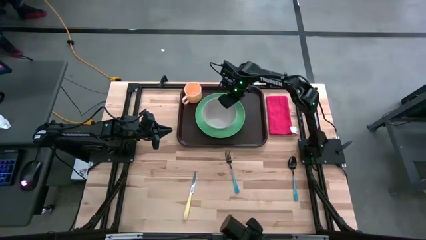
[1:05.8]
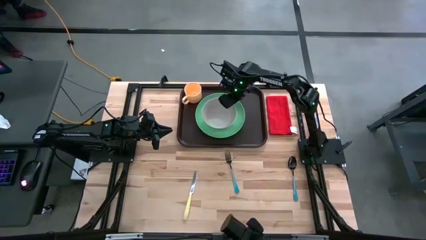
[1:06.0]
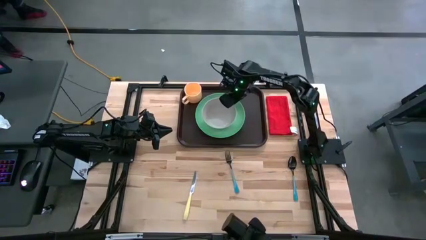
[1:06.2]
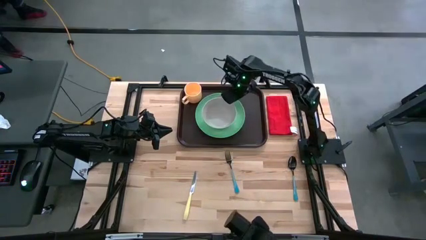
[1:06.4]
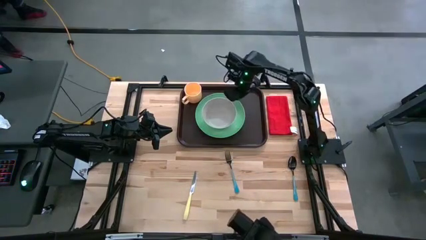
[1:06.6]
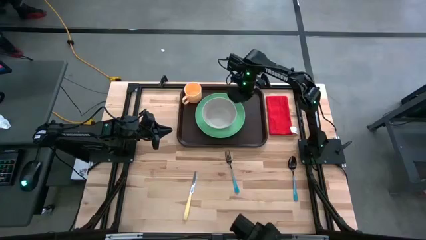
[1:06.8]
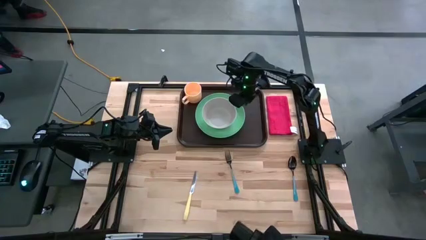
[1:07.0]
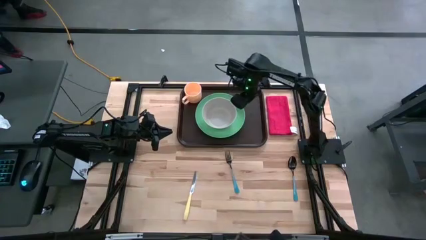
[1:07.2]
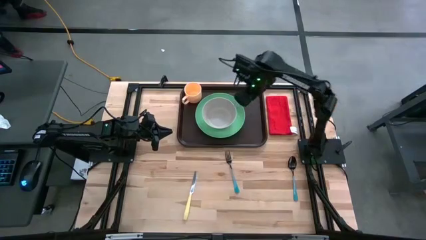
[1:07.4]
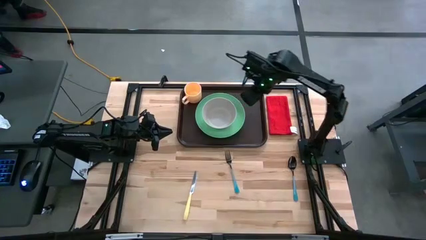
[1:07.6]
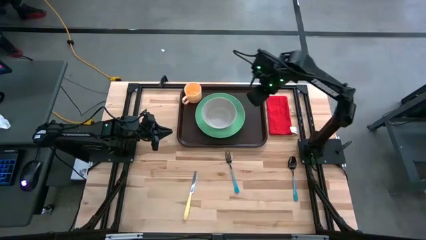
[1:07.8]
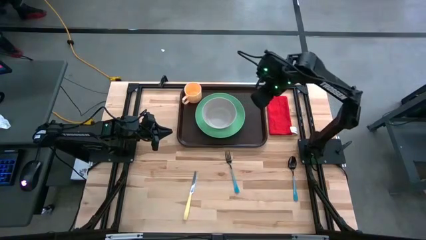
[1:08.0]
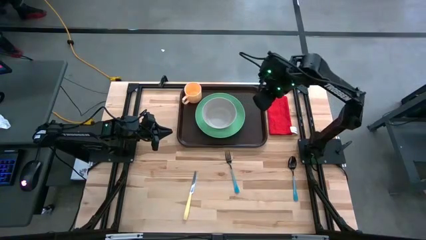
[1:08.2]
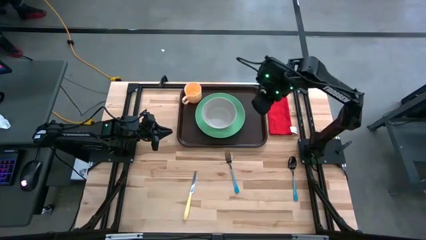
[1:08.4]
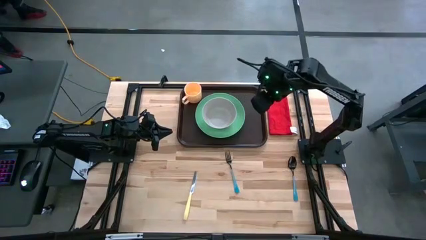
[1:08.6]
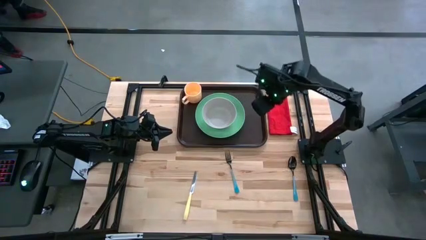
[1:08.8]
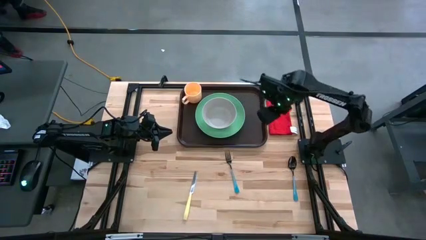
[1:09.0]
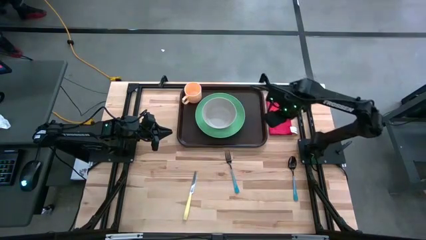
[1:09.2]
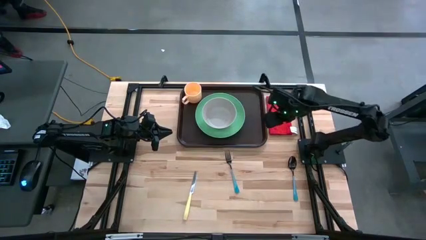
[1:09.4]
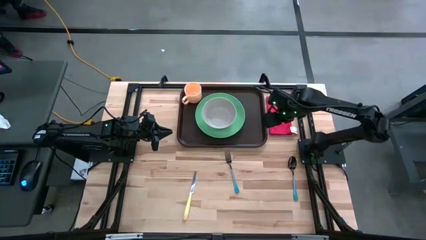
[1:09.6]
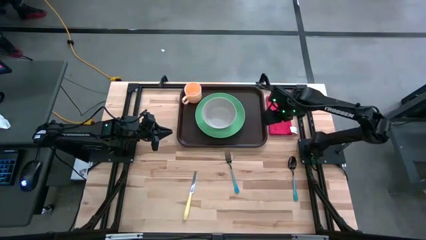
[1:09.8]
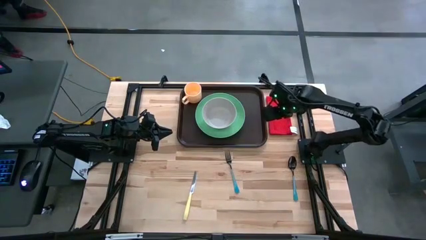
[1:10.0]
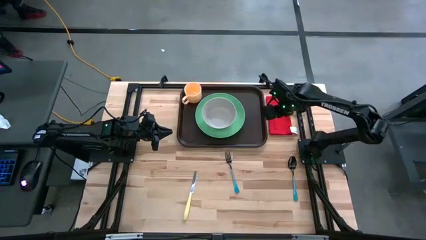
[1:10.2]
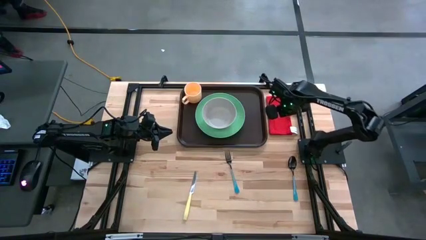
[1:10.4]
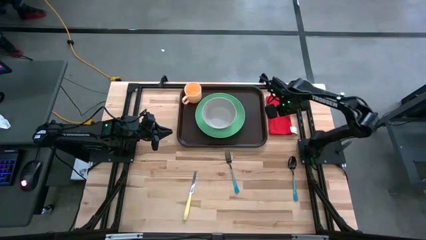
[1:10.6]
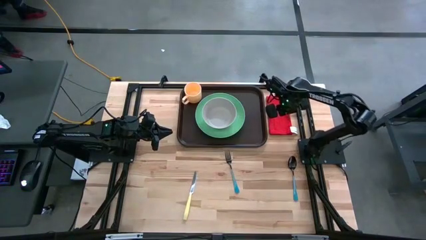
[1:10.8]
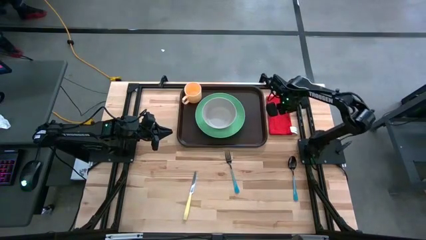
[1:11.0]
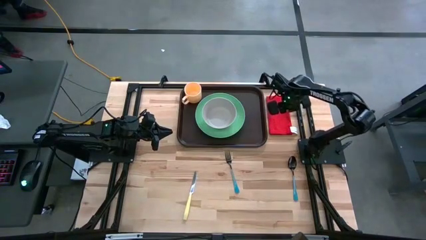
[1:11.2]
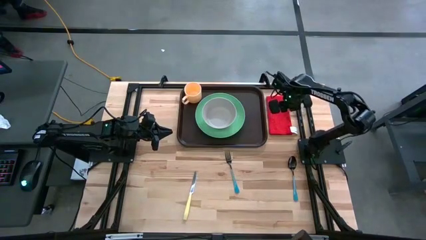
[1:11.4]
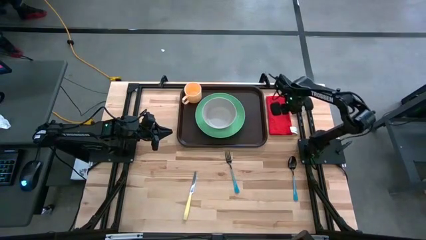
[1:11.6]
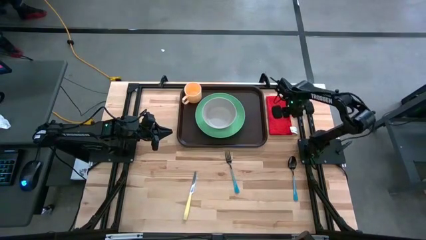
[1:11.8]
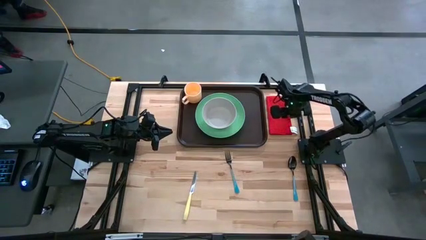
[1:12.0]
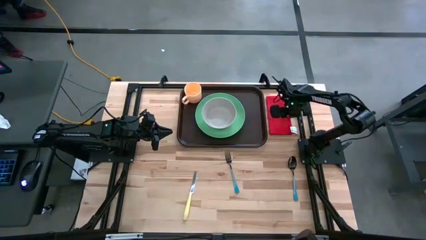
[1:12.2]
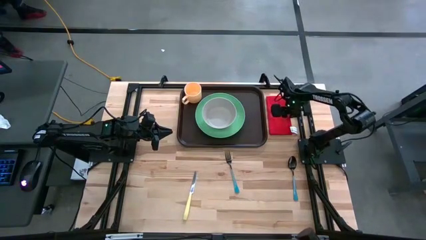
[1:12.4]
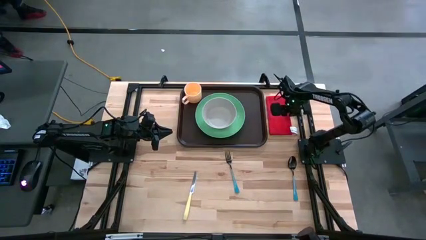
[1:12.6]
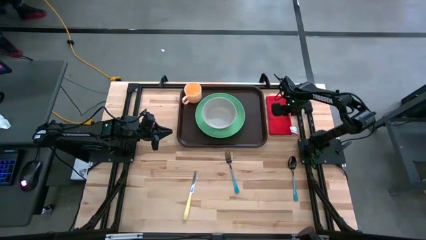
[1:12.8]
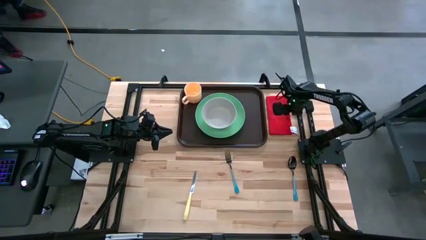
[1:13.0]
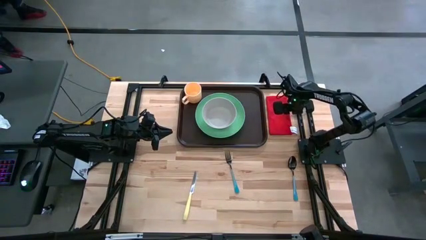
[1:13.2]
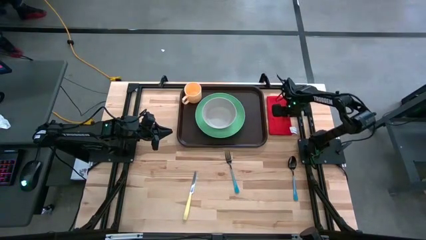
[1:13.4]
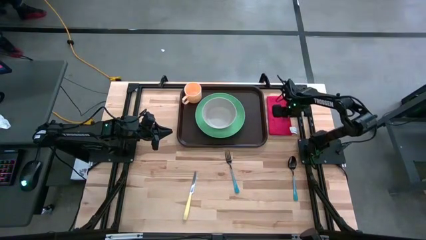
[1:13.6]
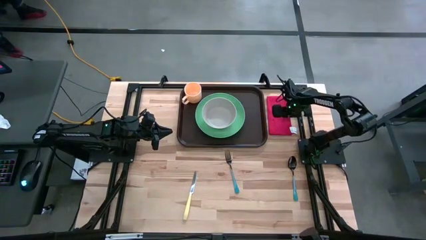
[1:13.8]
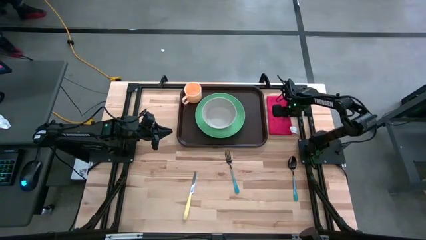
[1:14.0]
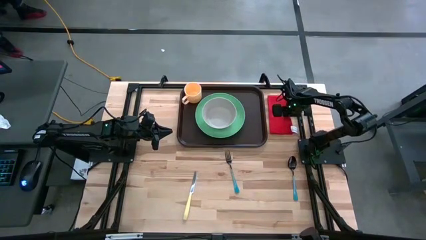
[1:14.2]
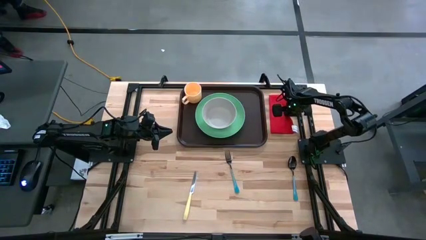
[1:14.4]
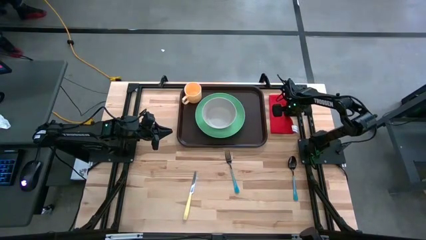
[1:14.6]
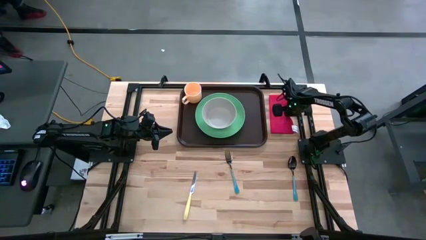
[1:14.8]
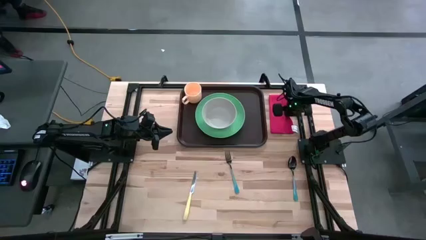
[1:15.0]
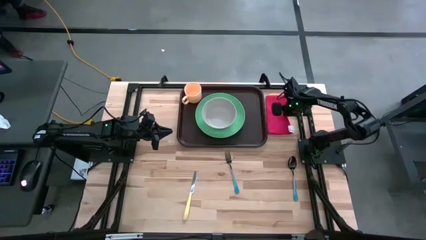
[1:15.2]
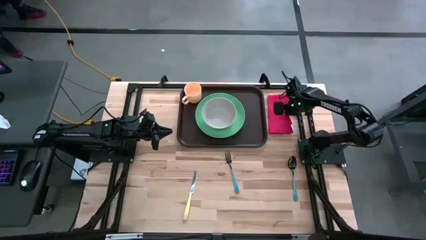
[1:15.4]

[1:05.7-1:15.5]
Task: Set up tray
Put the red napkin on the brown serving tray to the right of the green plate

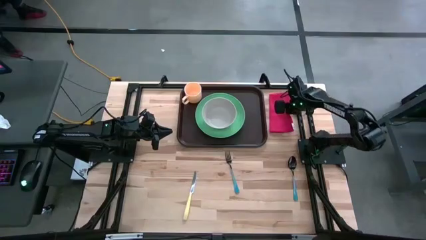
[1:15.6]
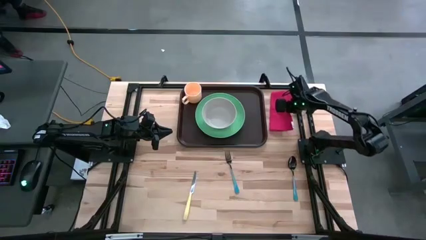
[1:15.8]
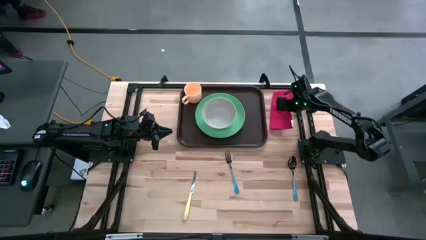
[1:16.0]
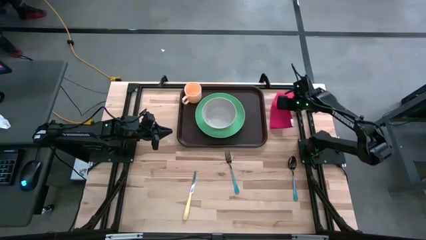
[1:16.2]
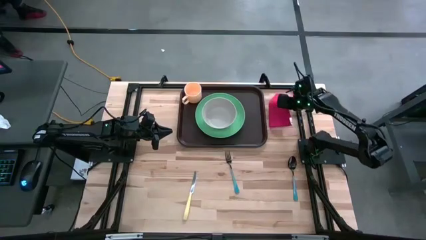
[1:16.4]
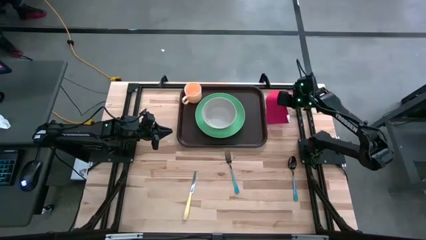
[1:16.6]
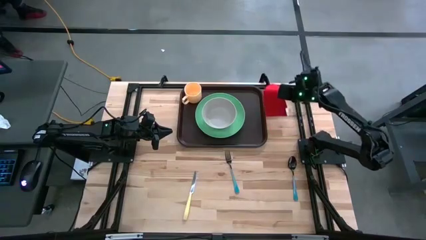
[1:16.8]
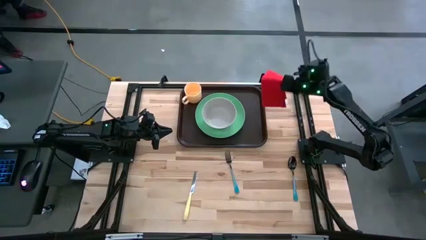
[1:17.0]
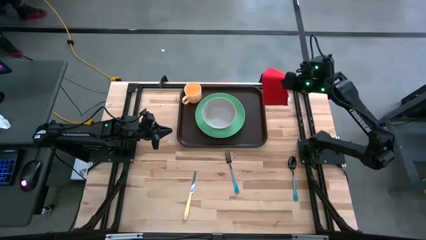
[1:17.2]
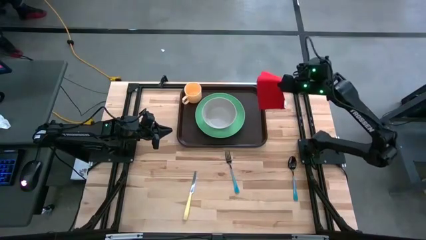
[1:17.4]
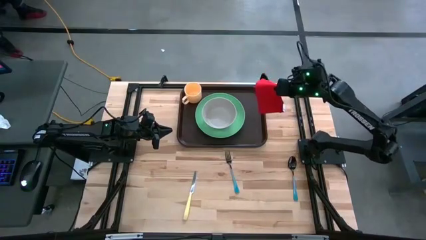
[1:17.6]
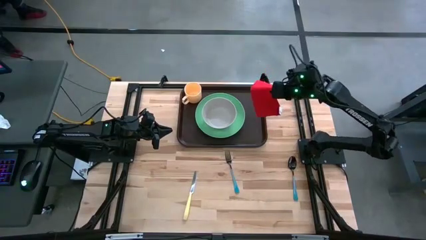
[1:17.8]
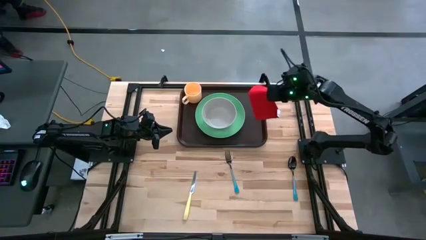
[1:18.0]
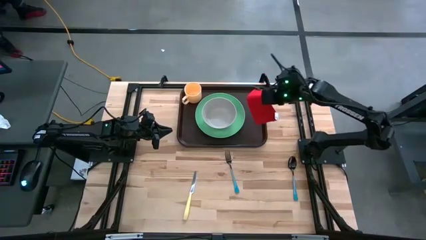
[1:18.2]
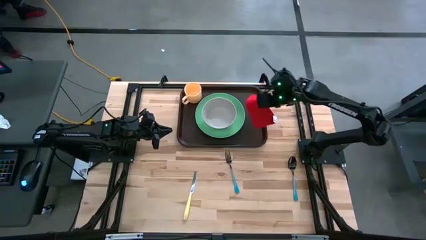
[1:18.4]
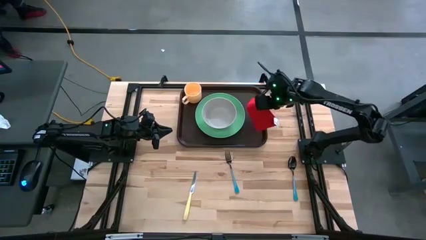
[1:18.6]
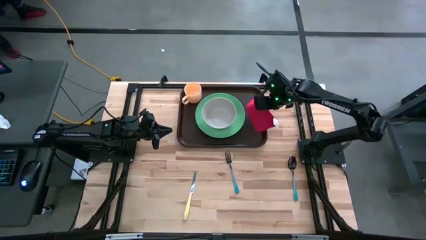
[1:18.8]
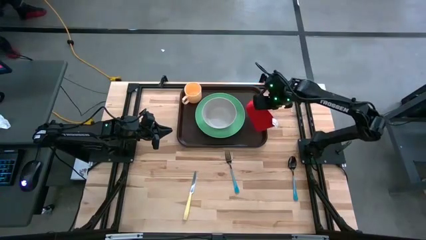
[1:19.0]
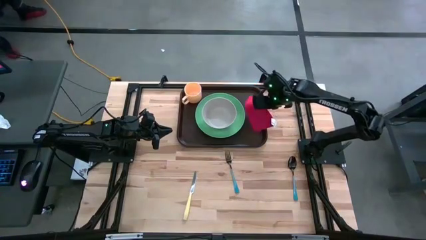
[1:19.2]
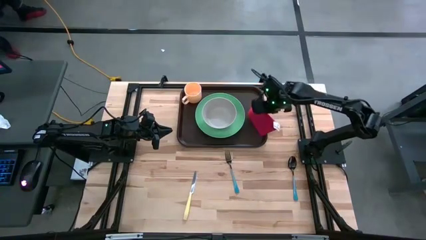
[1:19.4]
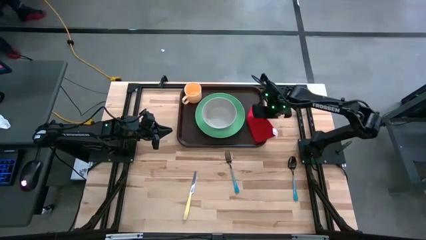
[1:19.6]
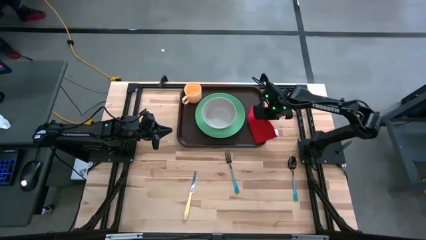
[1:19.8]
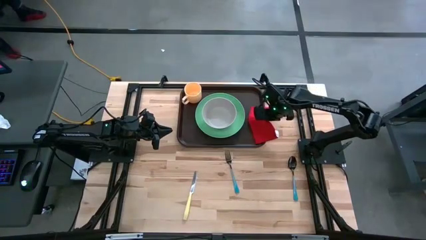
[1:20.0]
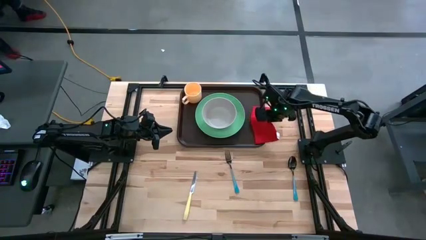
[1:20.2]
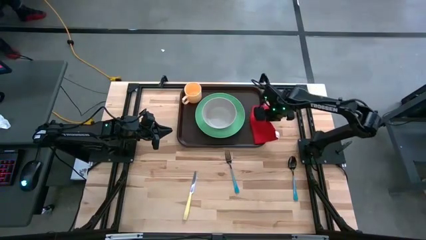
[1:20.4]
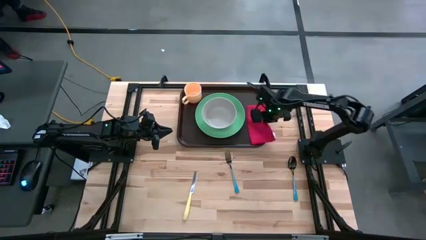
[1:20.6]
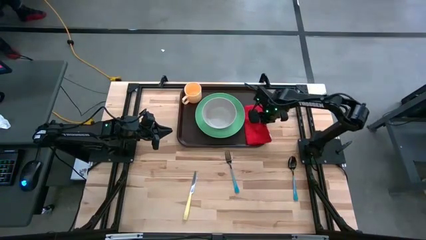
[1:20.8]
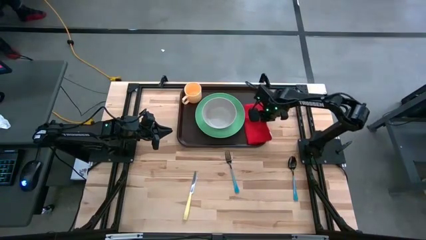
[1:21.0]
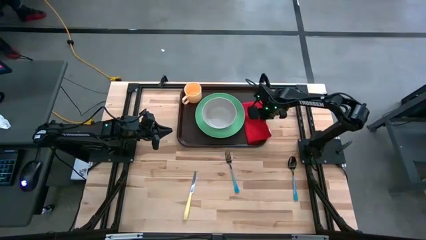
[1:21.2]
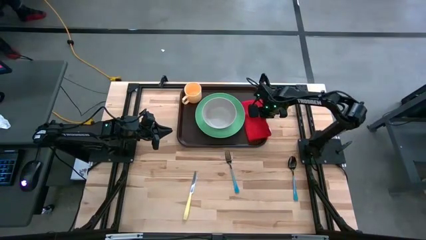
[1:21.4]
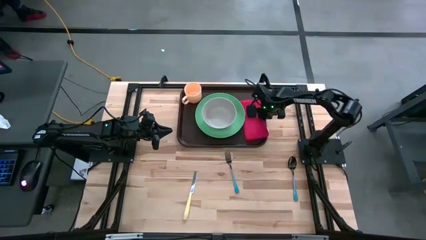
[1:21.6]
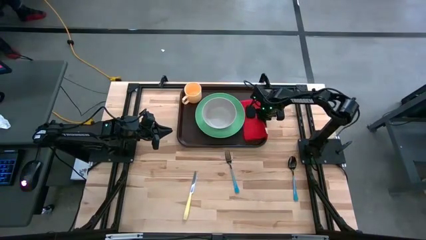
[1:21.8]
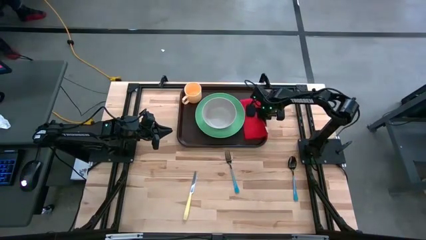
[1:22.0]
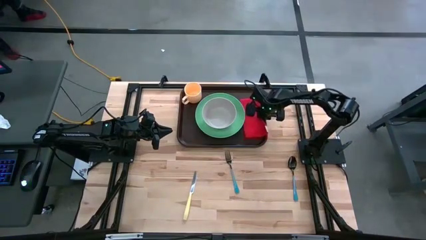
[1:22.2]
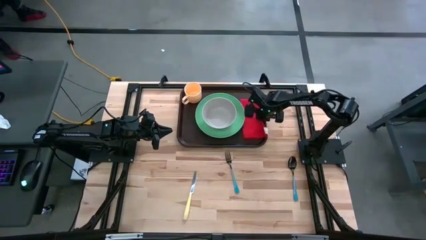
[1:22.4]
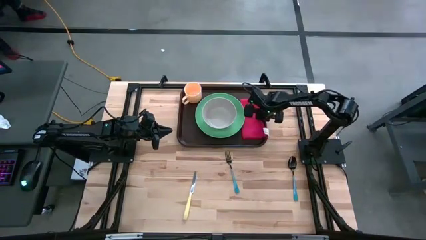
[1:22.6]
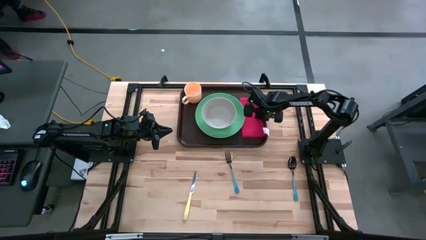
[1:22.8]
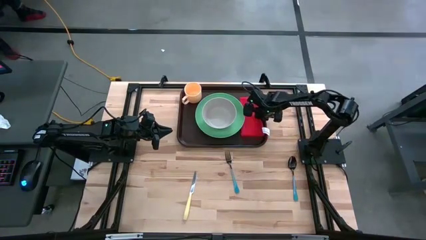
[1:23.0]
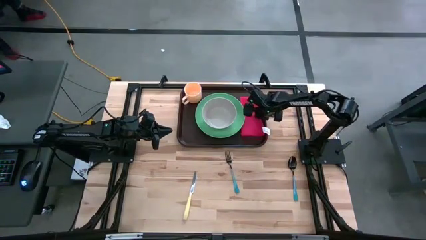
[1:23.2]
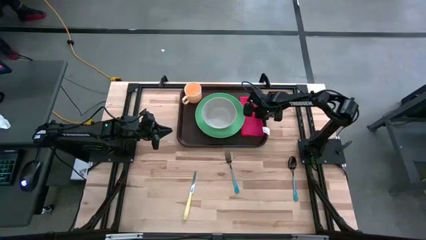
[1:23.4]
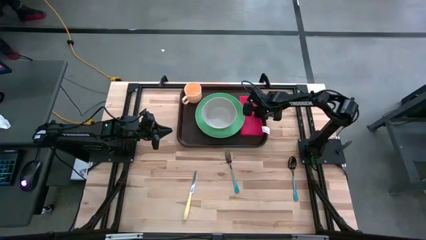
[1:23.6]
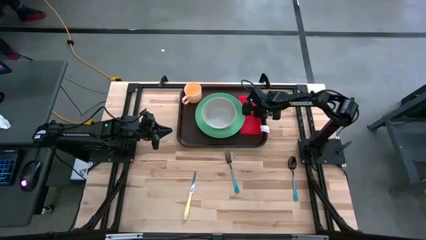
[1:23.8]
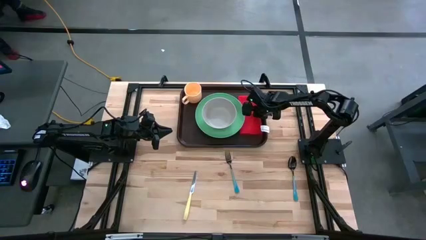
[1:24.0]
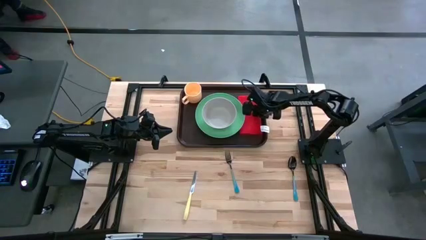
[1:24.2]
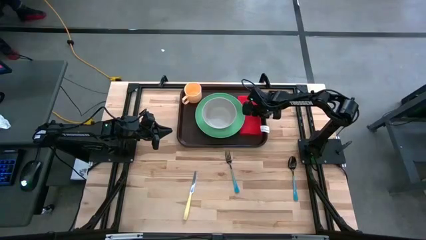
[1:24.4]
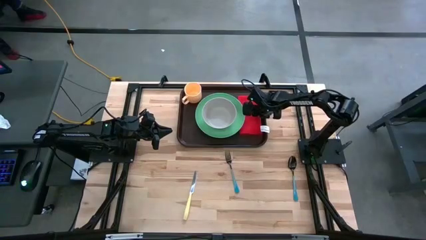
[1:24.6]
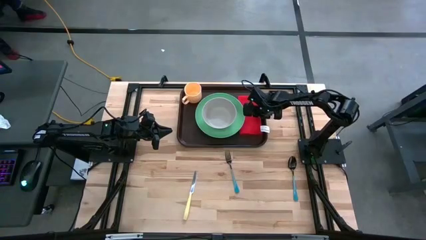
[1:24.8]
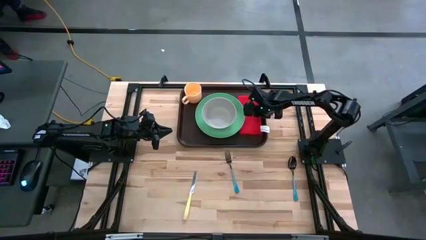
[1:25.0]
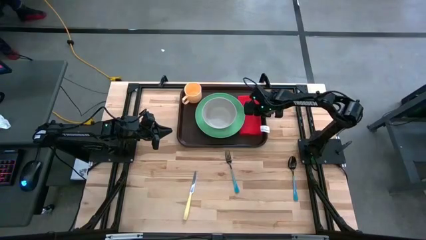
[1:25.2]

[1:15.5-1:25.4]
Put the red napkin on the brown serving tray to the right of the green plate
